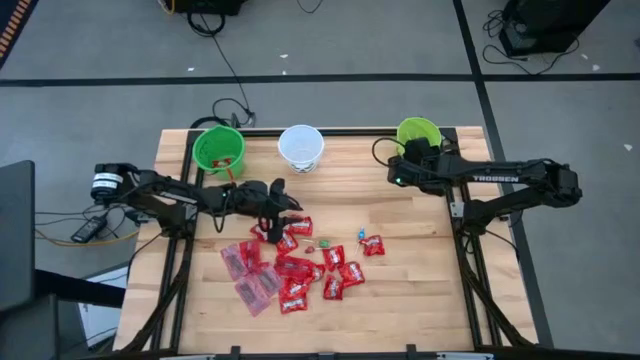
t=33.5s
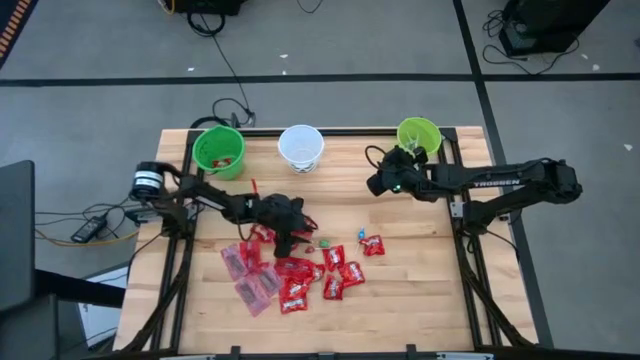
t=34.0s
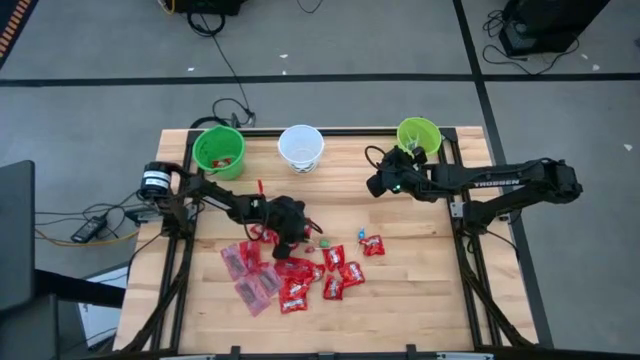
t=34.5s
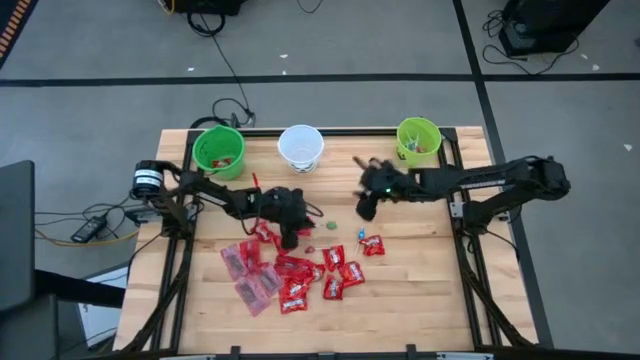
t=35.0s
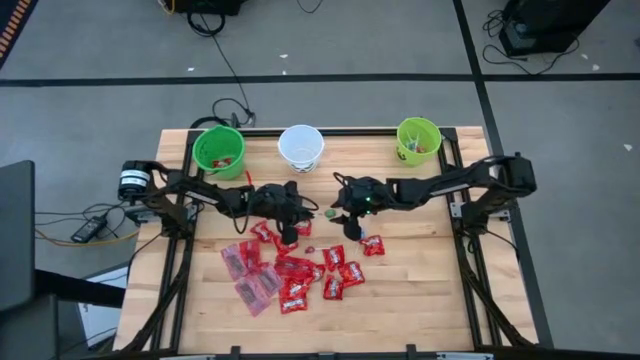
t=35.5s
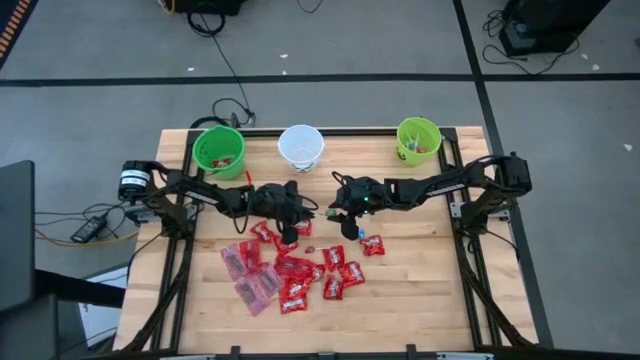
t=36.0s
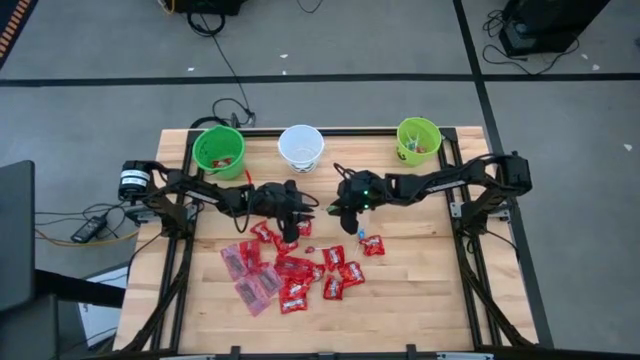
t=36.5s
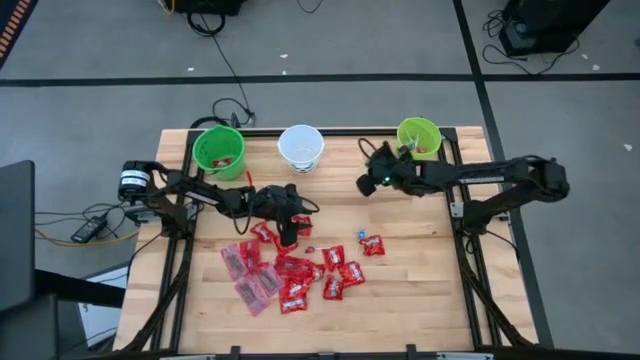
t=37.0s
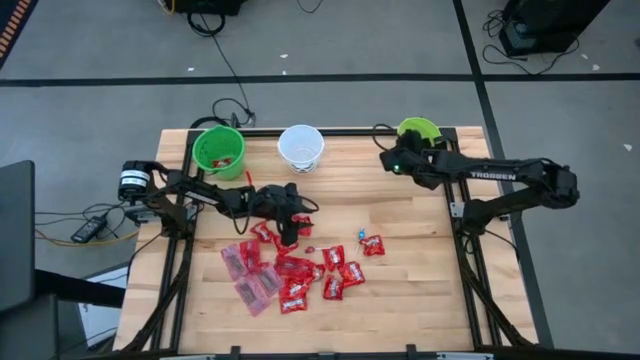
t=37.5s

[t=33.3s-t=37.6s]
Task: Sort candy by brand, put in halloween buckets
Put the green lollipop into the light green bucket

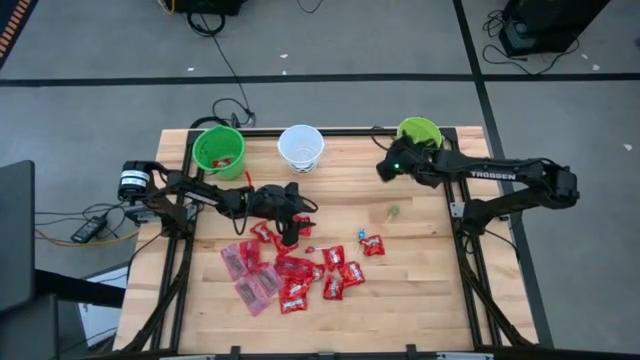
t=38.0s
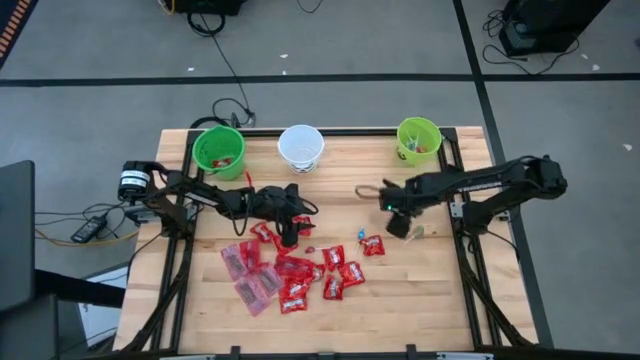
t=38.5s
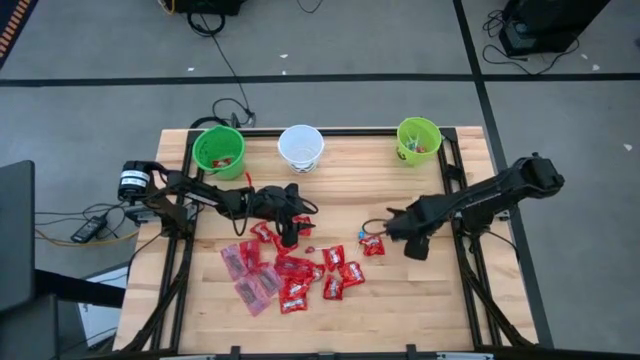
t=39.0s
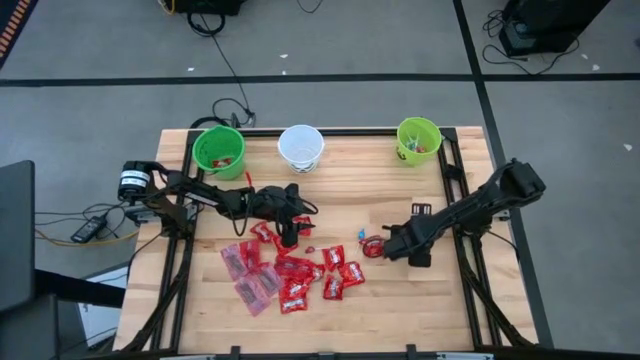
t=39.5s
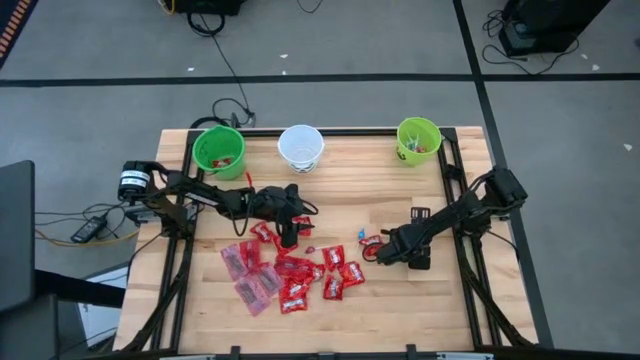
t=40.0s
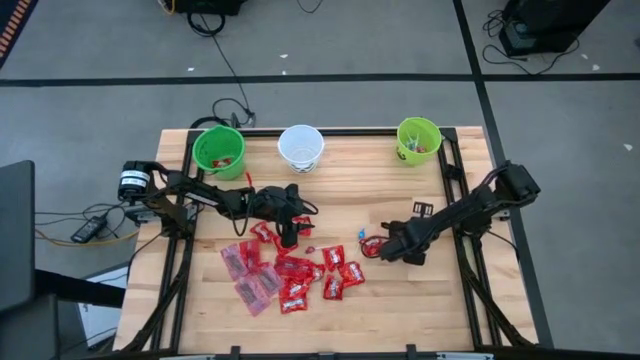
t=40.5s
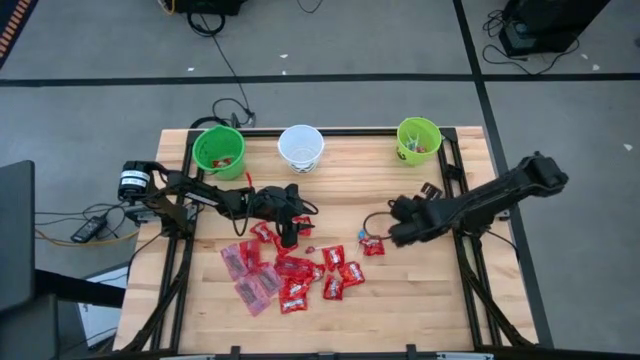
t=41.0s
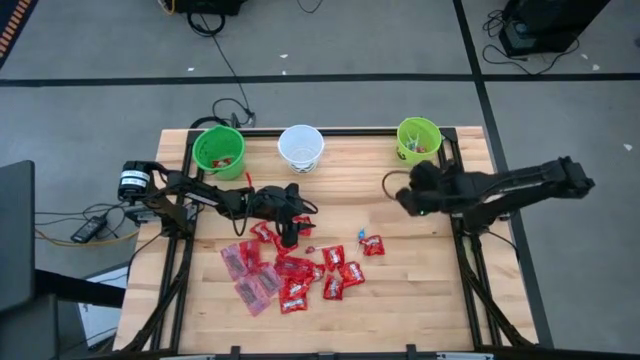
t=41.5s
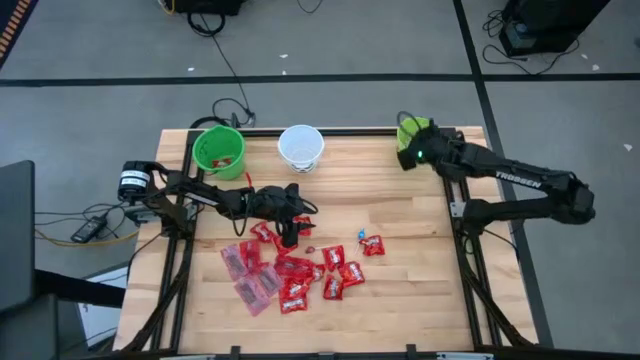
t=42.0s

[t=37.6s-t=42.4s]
Put the green lollipop into the light green bucket

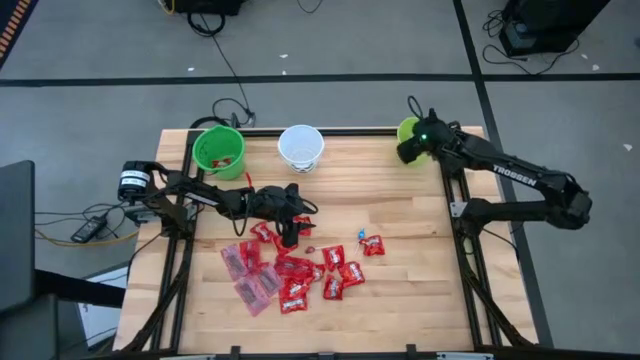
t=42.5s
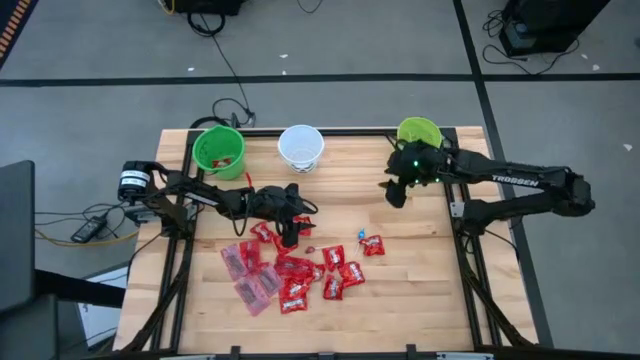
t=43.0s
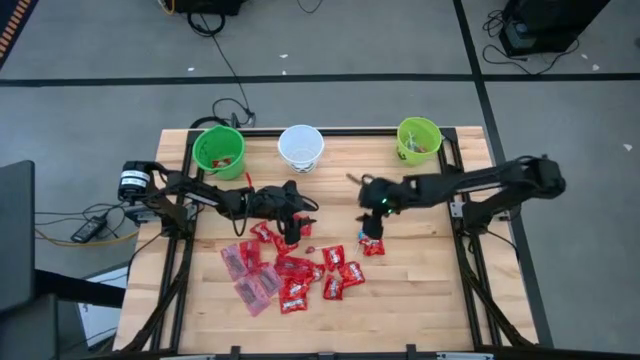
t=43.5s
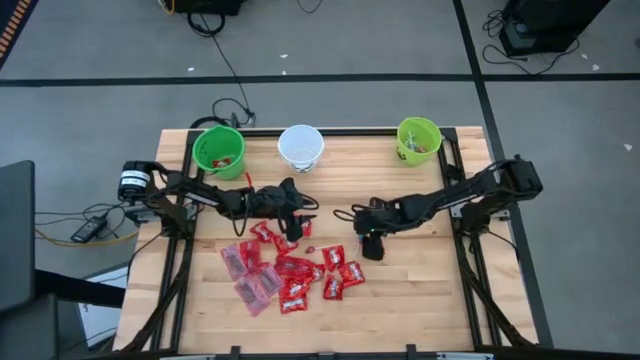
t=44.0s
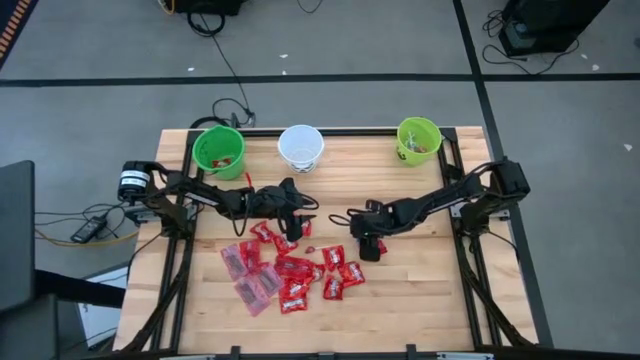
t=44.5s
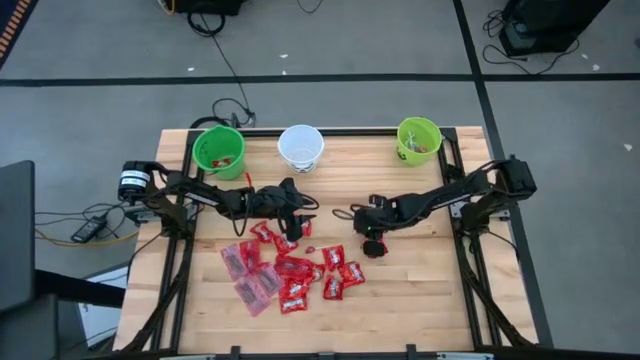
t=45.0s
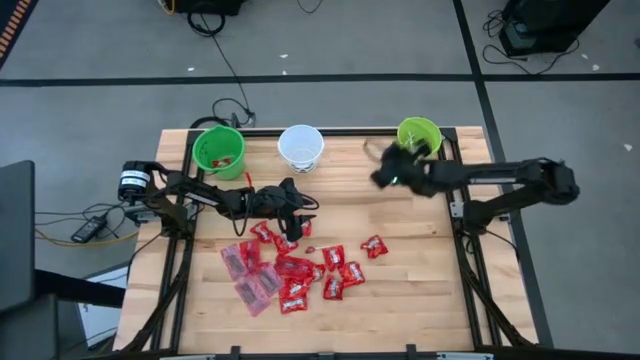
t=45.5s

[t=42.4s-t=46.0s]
Put the blue lollipop into the light green bucket

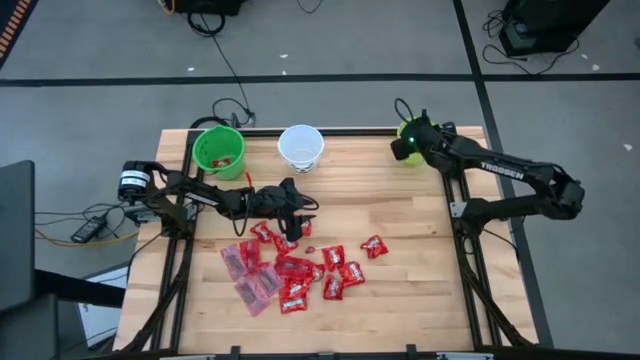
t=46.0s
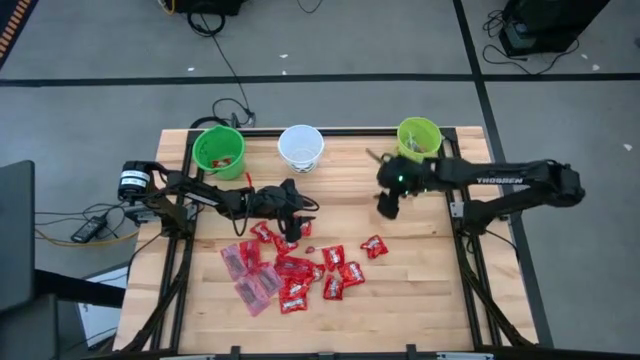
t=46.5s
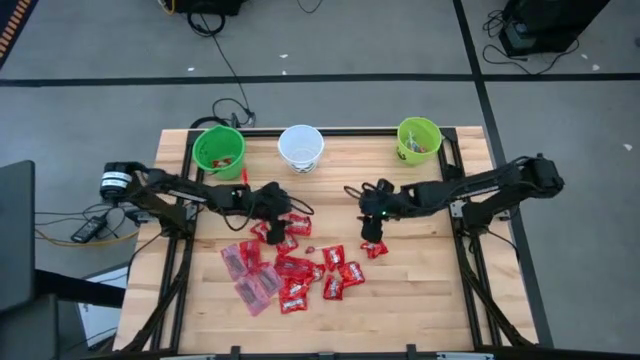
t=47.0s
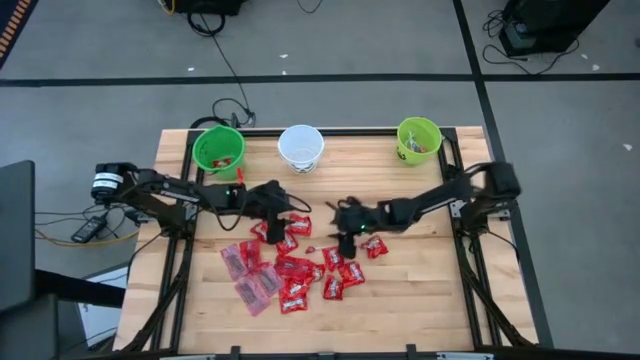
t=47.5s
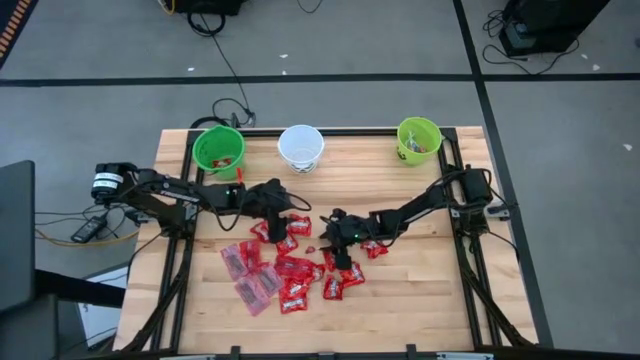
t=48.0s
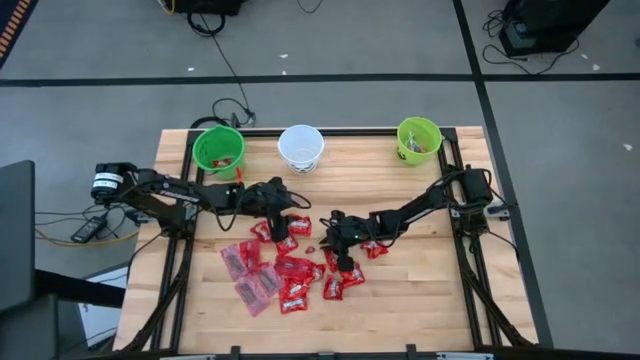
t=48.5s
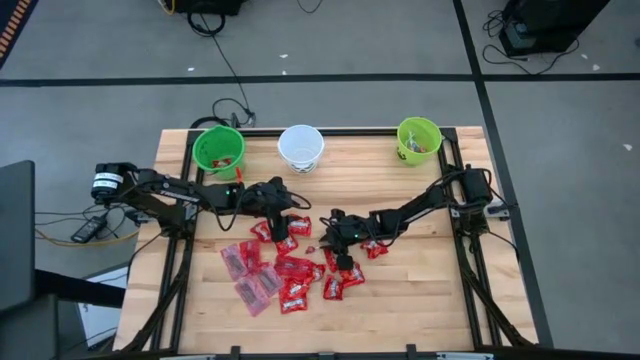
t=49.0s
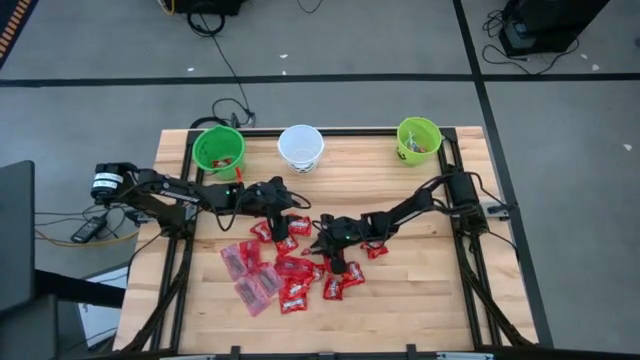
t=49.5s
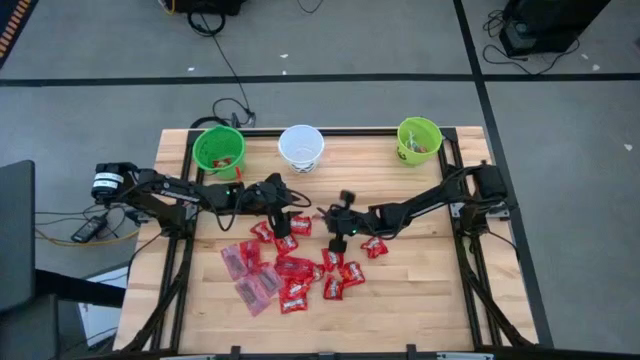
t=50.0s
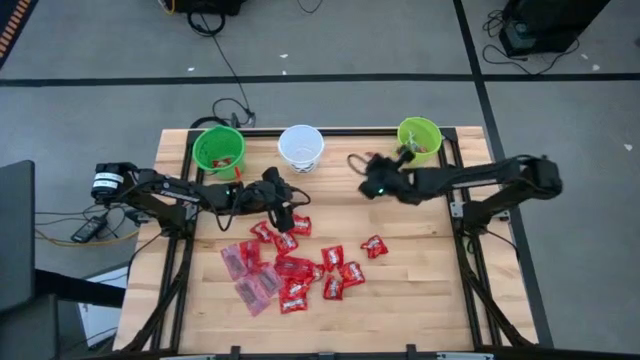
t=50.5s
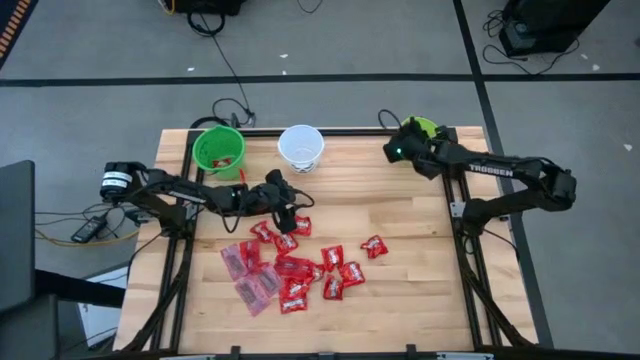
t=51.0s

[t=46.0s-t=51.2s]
Put the red lollipop into the light green bucket

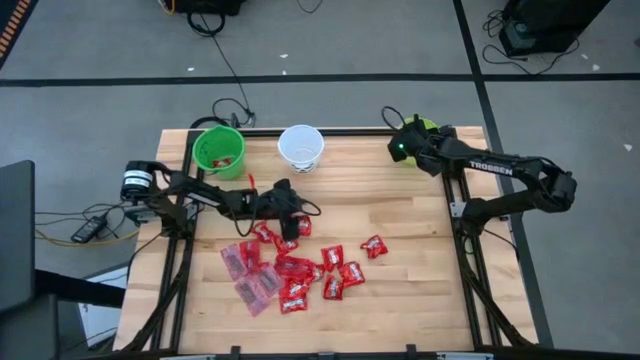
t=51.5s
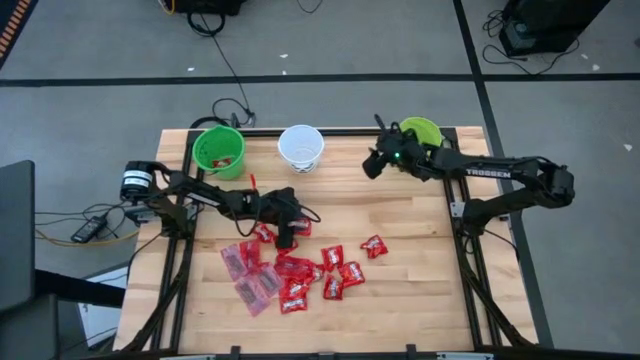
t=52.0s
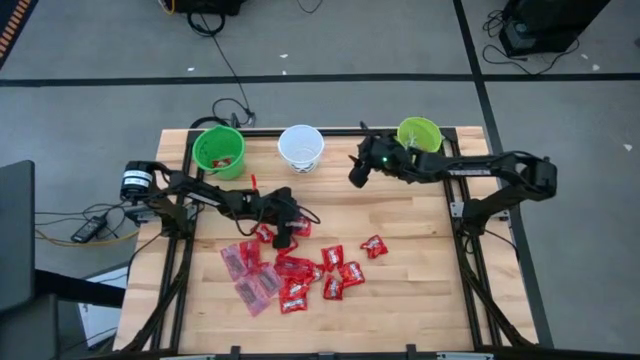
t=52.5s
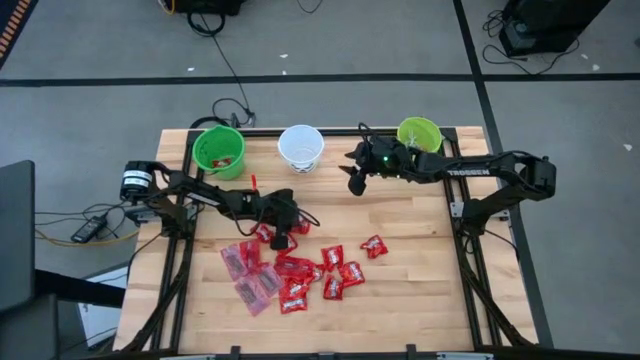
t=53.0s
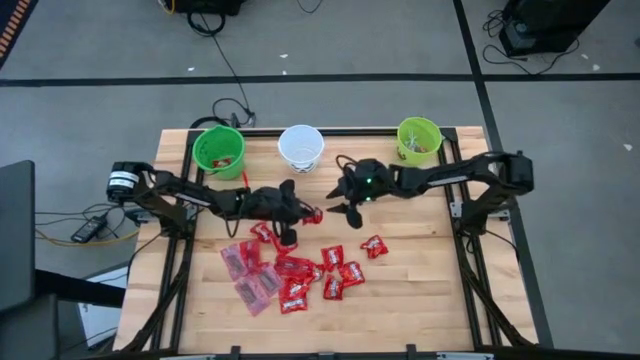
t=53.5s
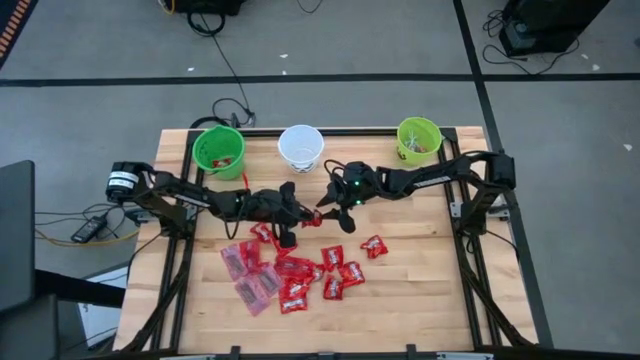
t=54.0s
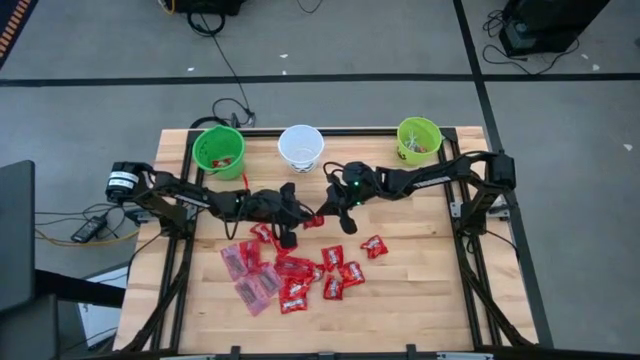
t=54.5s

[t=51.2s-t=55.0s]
Put the red candy into the white bucket

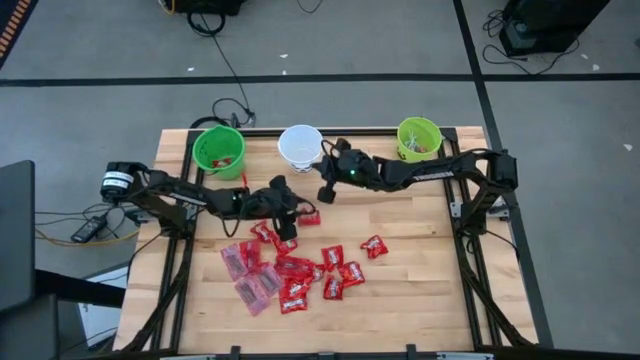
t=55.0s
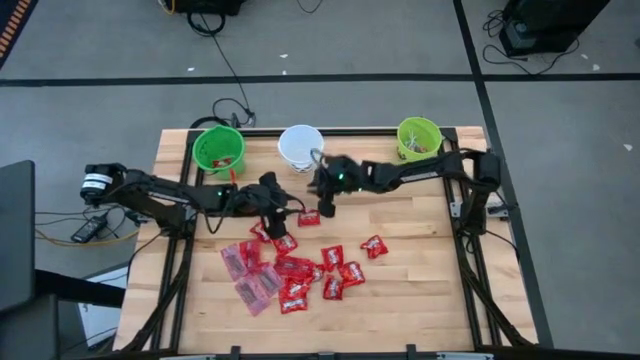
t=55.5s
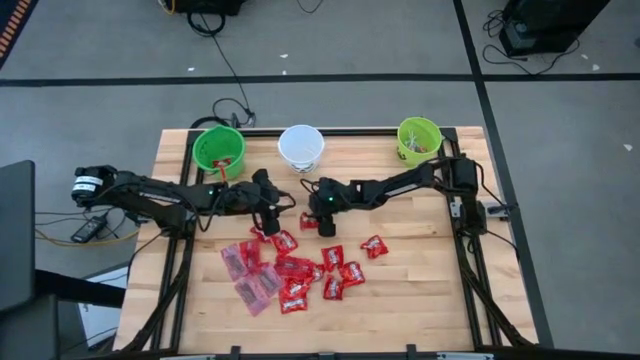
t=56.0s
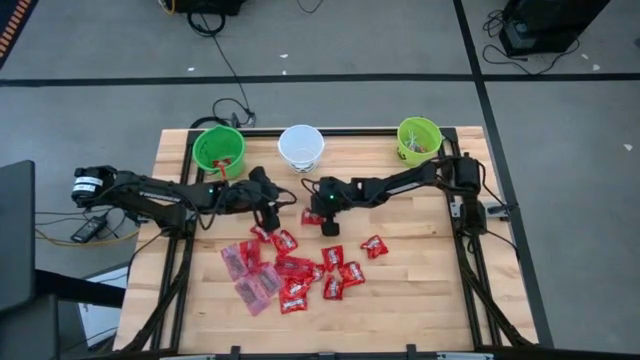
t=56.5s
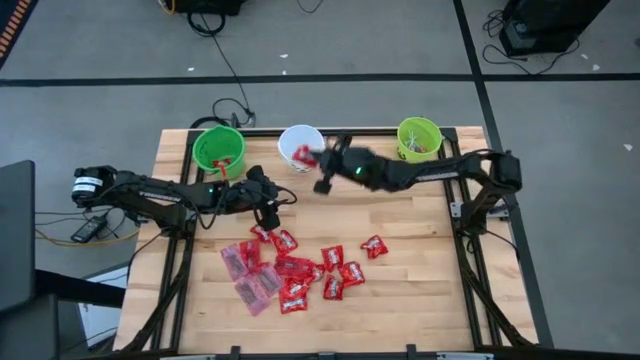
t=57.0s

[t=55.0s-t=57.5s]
Put the red candy into the white bucket
